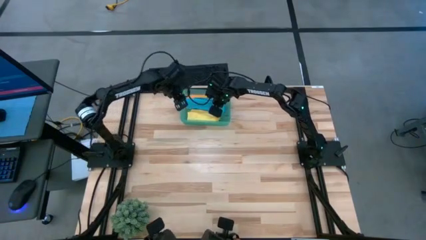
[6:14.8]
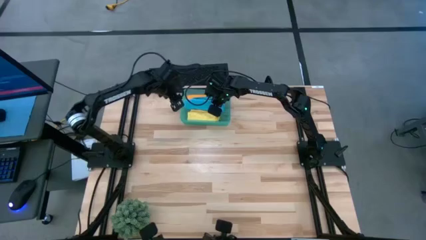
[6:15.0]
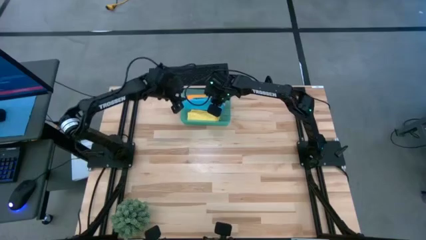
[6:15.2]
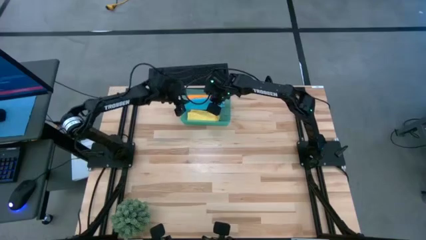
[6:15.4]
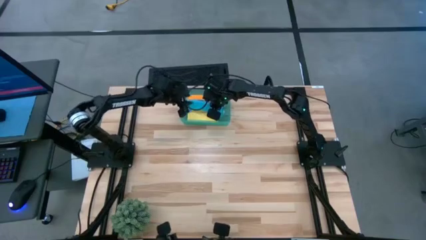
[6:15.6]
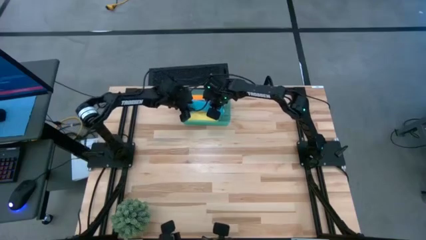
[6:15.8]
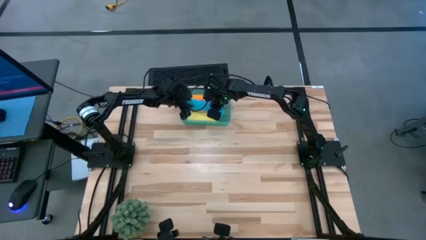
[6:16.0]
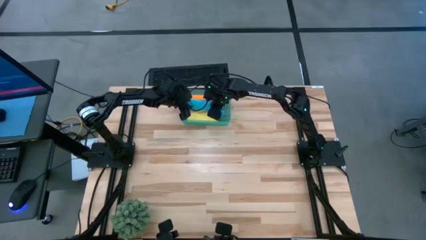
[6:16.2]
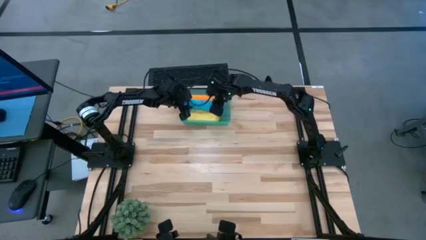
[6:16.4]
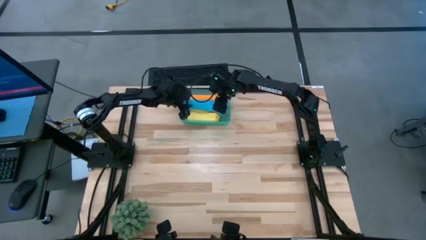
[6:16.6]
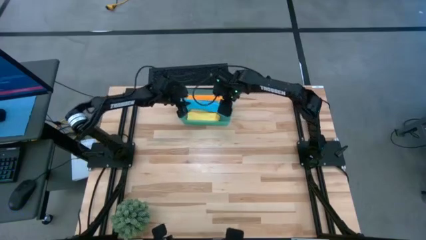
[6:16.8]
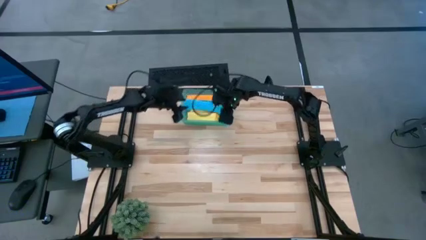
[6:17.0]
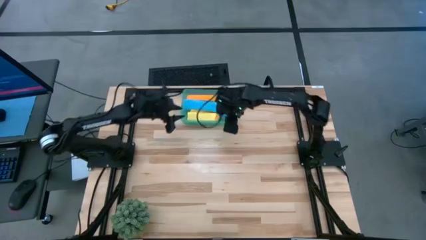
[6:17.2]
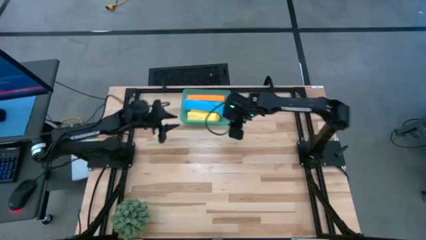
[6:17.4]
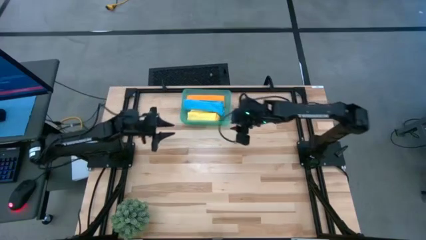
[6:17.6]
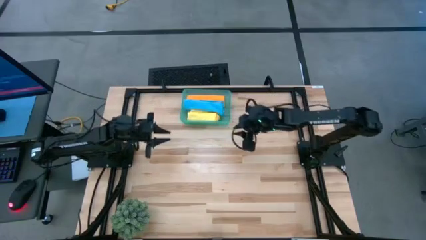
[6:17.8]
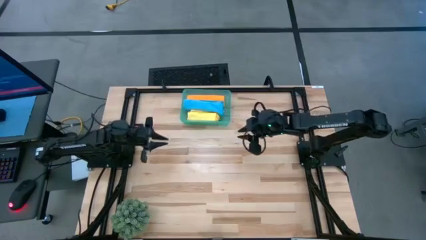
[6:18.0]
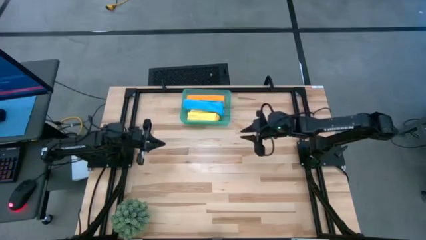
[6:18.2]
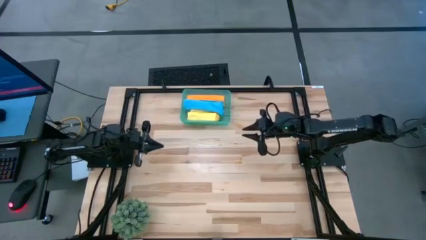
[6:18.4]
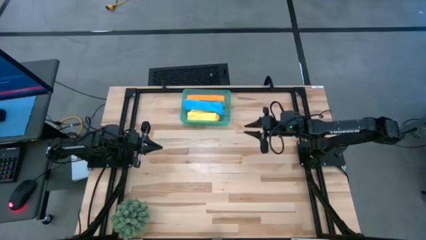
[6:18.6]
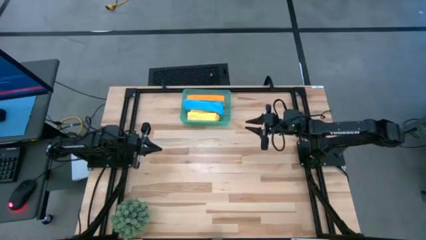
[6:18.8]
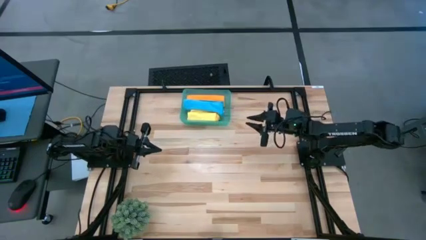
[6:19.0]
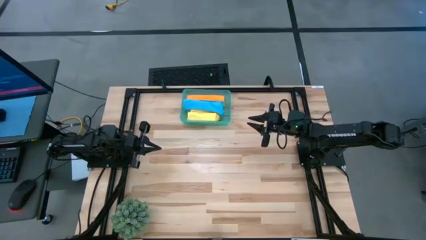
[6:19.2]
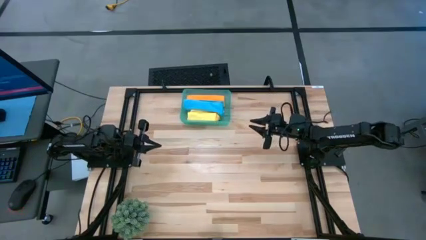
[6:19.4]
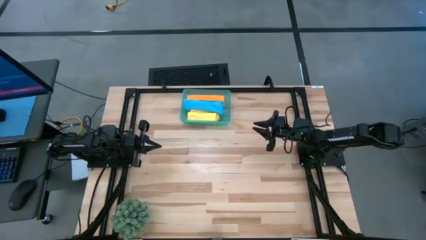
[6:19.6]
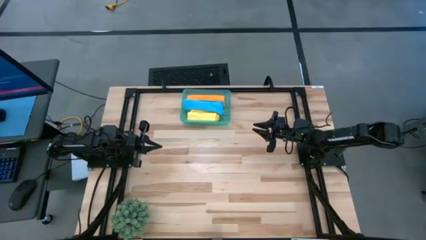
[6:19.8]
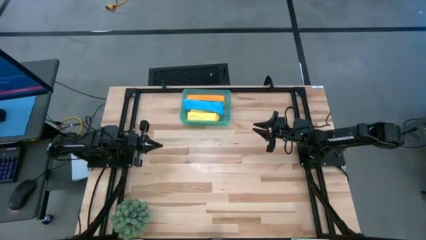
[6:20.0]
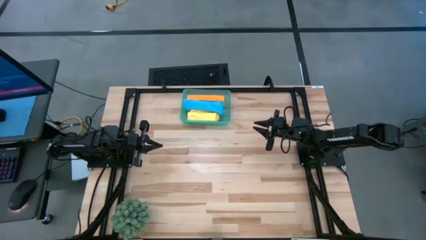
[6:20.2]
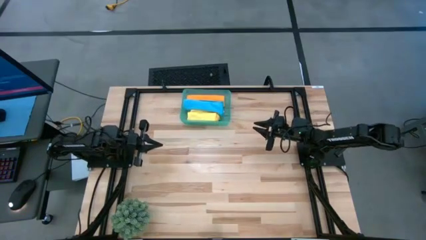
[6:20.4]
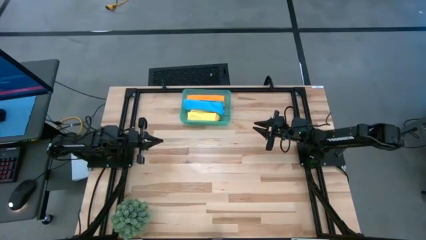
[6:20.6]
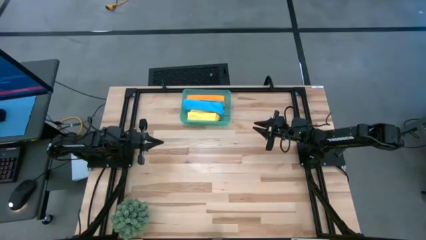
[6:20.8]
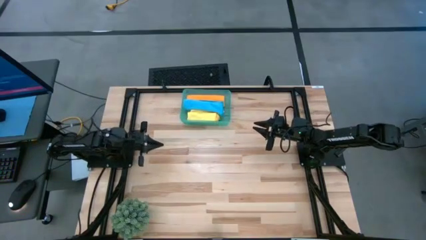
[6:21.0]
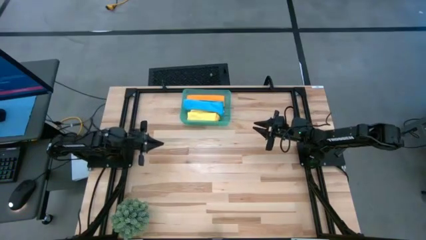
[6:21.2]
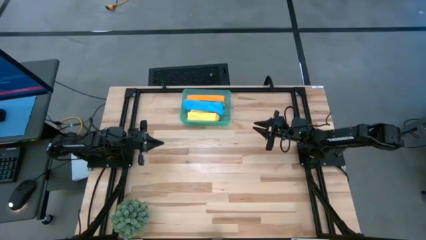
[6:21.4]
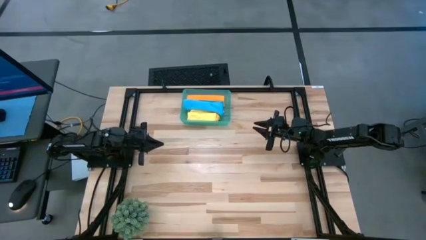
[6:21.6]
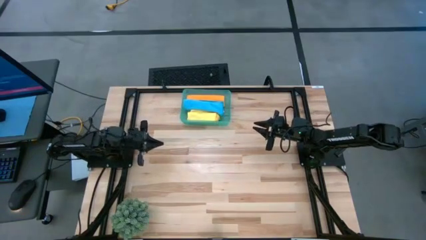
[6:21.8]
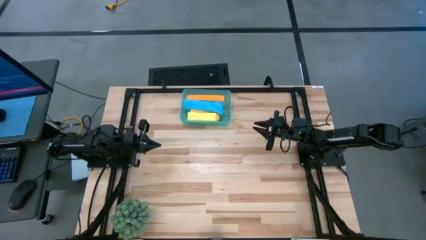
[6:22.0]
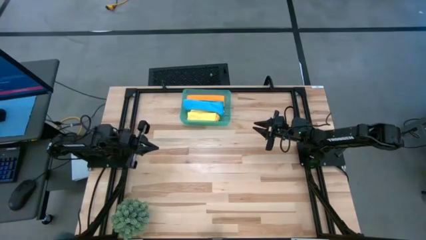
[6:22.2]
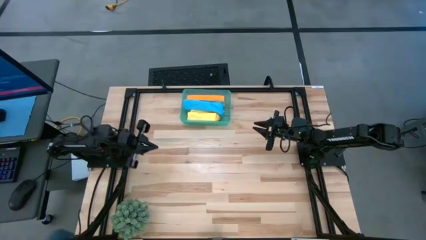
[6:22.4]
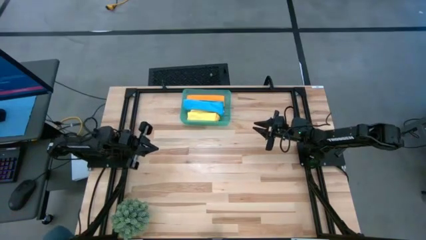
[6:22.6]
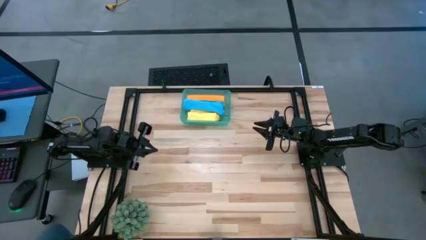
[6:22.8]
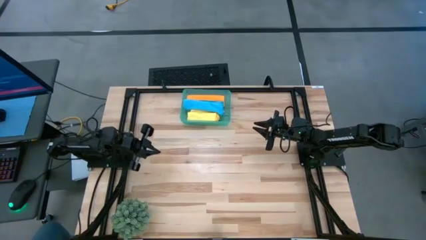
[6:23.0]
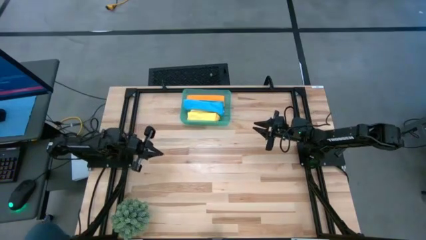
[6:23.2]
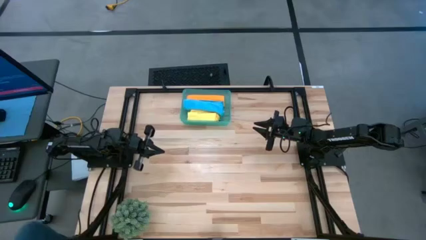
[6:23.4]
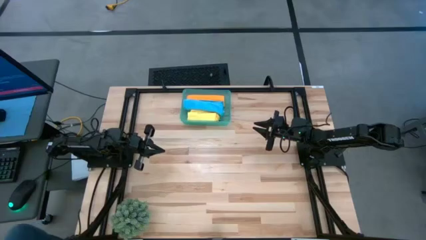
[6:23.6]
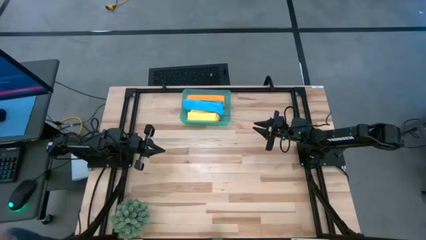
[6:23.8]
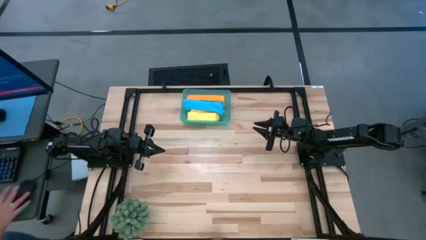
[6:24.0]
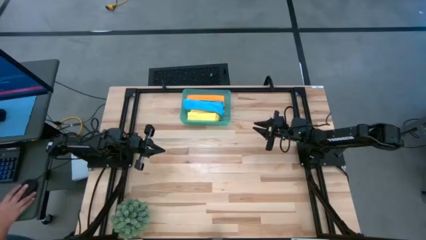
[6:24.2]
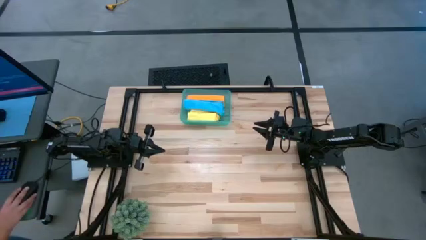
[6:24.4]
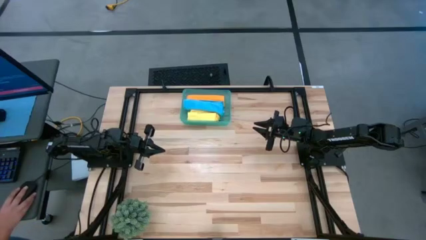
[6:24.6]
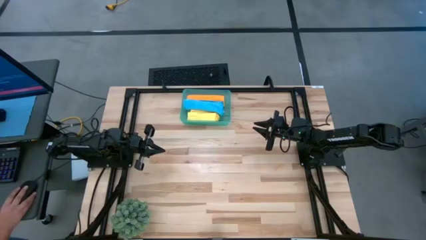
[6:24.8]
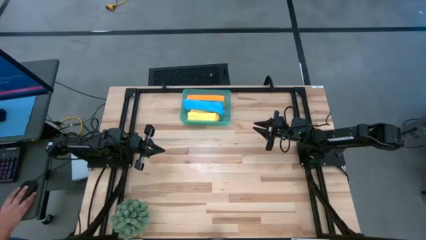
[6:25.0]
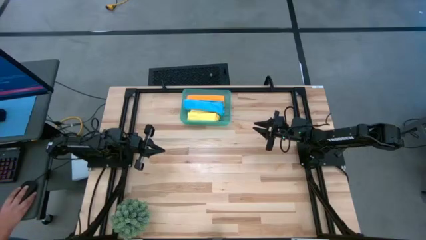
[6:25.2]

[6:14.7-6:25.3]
Task: Roll microfiber towels into tight, uniform cylinder then place into a basket
Return to Home Position

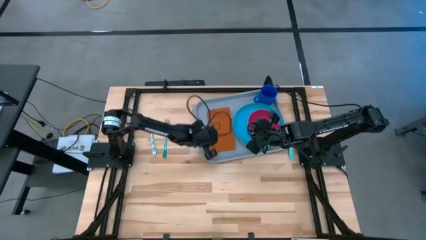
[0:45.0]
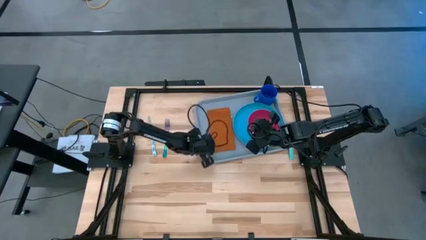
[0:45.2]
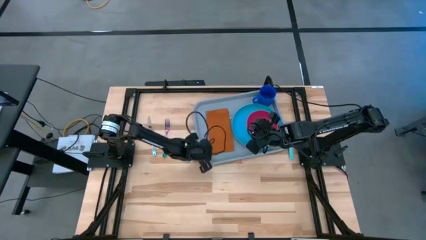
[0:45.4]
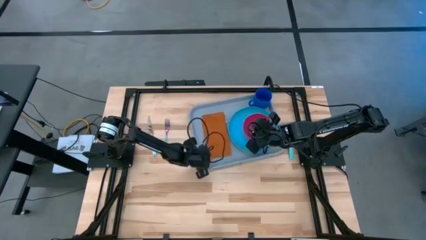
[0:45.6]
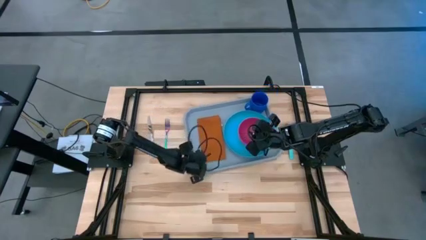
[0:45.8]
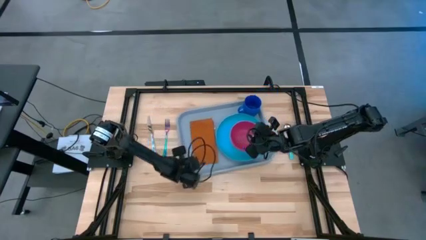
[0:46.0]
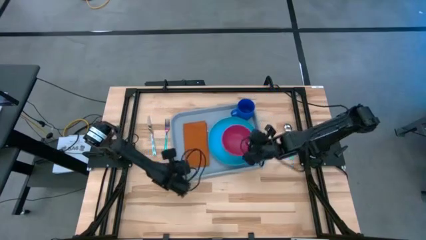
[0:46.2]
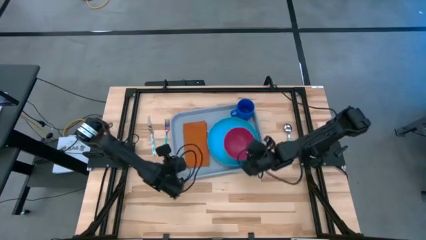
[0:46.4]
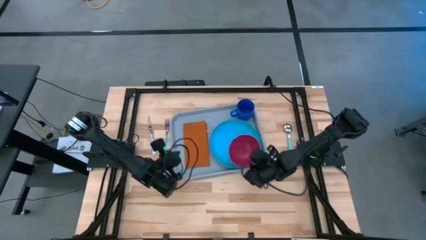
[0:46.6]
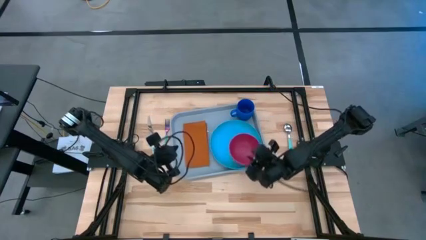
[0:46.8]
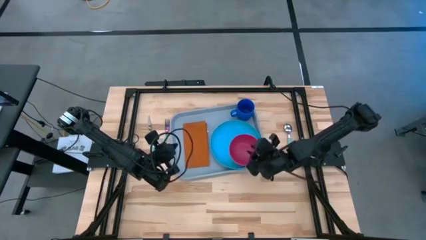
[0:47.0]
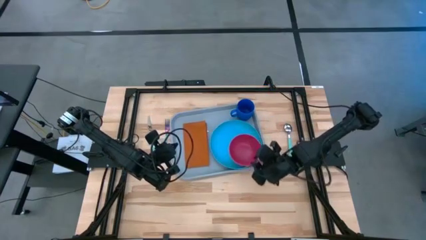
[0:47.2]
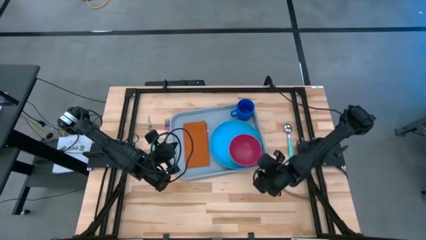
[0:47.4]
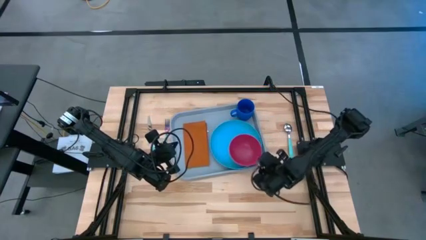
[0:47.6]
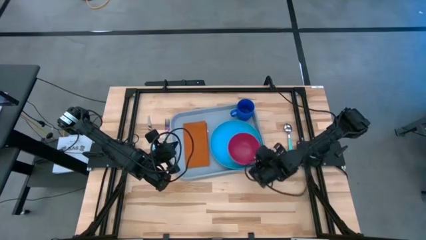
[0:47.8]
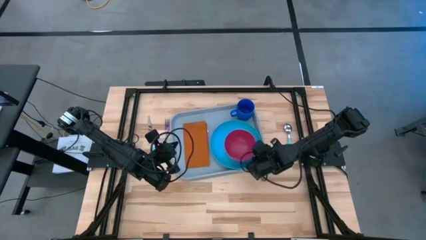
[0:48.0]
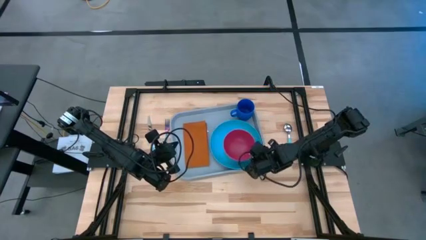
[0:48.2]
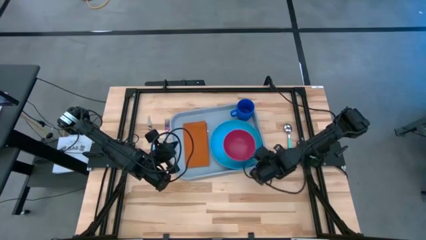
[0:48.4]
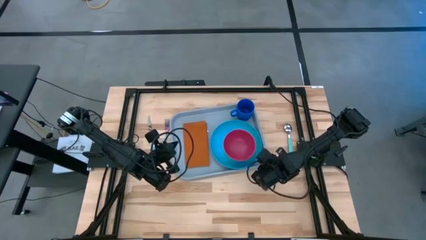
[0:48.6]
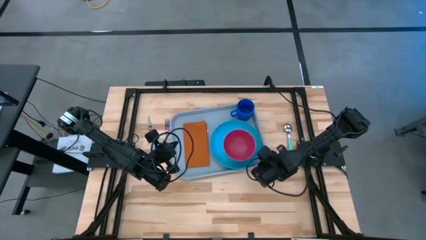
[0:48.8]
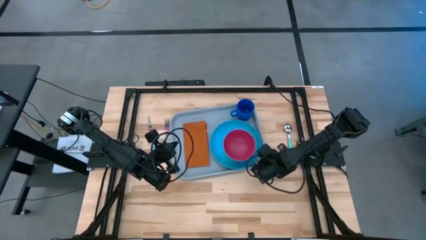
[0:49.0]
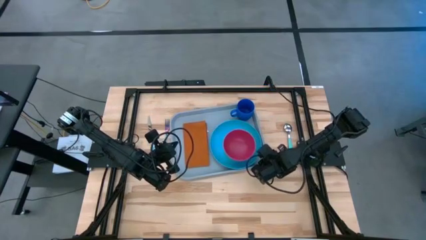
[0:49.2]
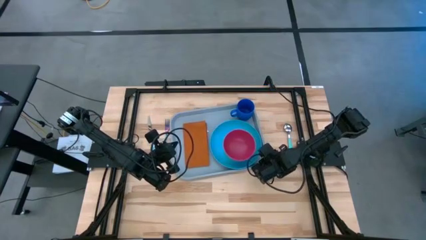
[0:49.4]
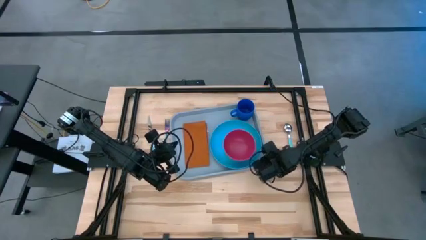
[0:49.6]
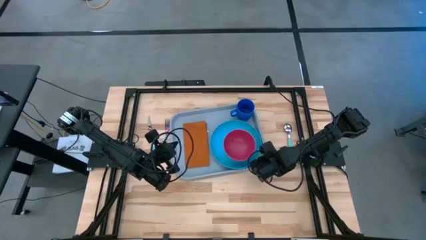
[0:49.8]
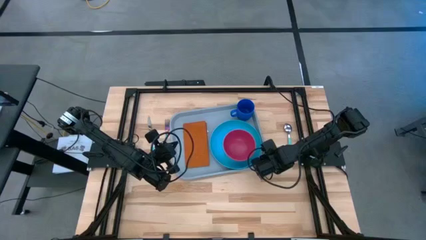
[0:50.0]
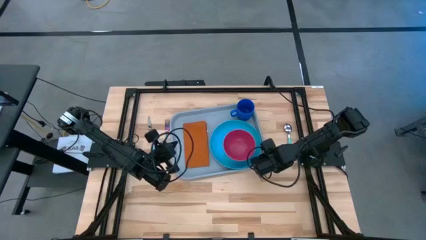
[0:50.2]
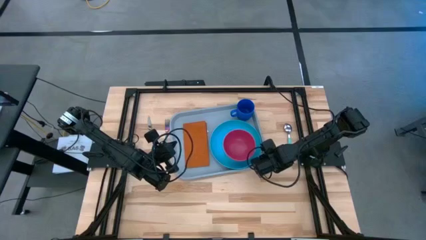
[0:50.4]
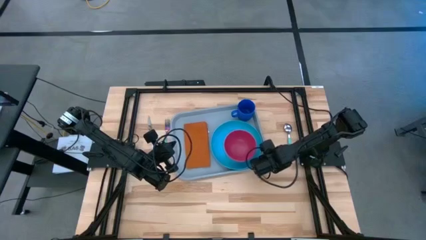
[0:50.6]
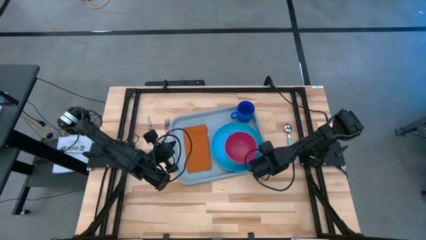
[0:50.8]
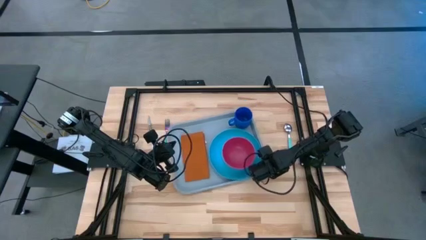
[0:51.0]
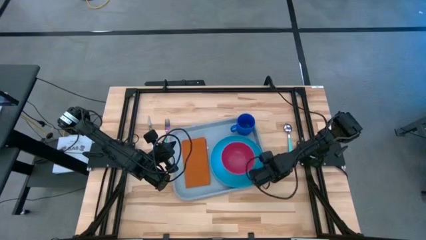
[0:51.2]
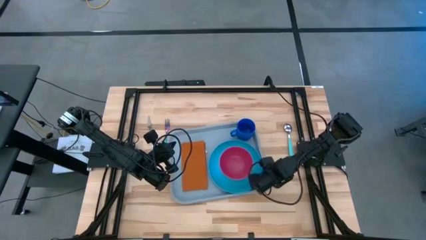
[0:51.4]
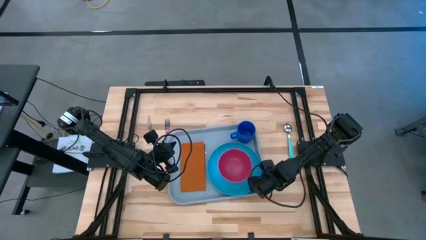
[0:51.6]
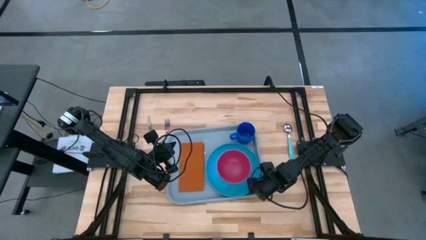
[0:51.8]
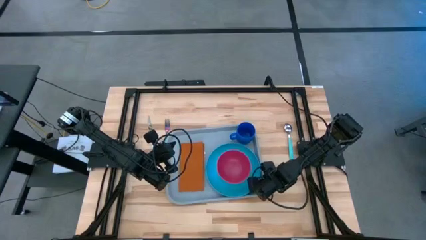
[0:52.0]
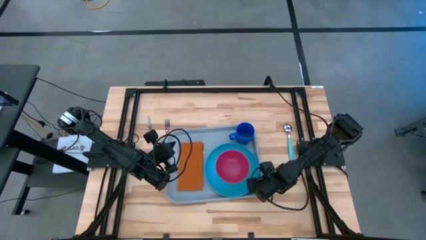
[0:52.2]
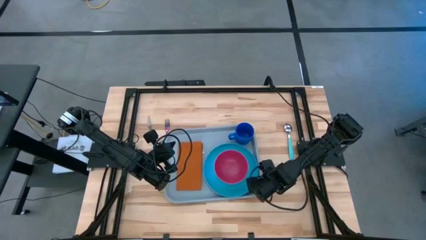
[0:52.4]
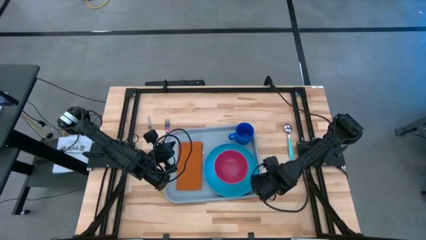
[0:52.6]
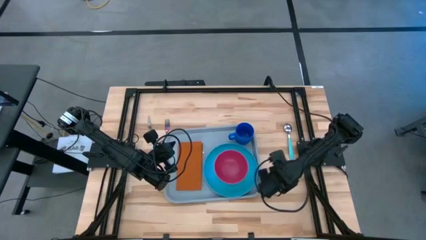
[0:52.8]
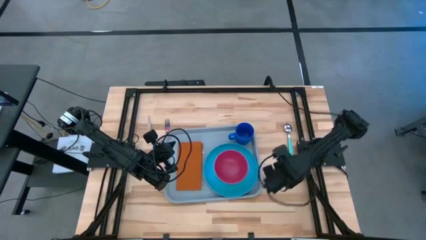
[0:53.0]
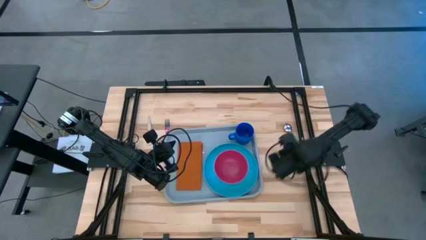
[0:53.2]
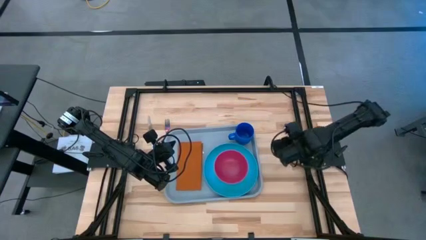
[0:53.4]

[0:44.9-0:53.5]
Task: Set up tray
Adjust the gray serving tray
